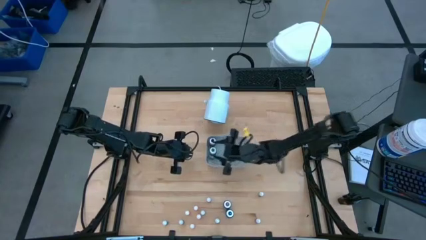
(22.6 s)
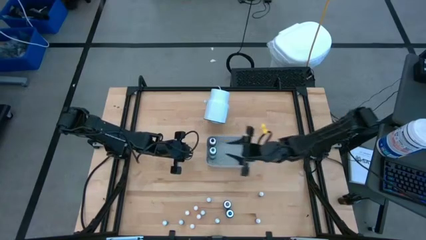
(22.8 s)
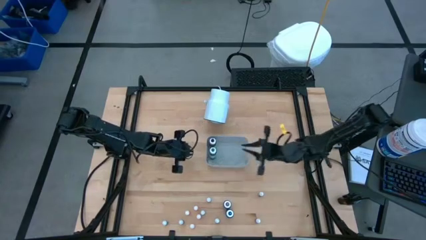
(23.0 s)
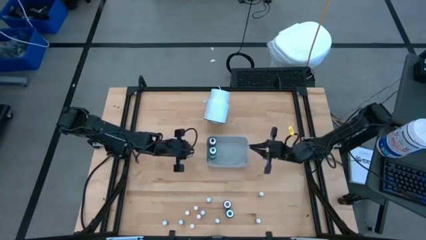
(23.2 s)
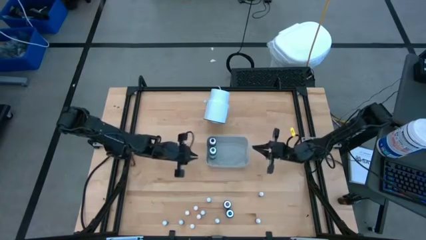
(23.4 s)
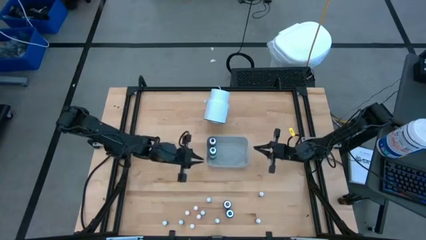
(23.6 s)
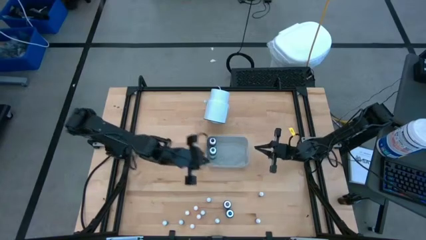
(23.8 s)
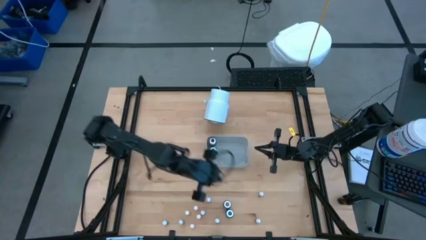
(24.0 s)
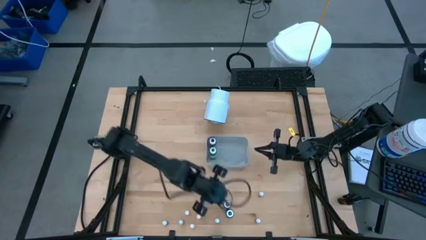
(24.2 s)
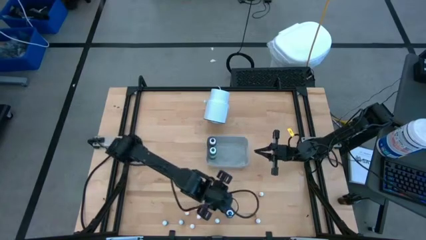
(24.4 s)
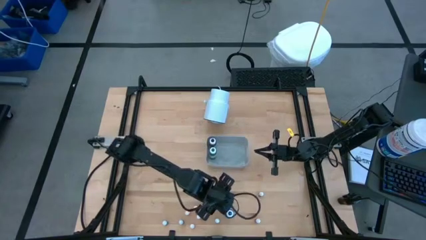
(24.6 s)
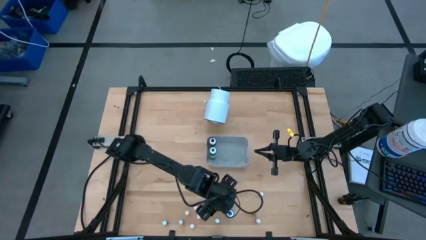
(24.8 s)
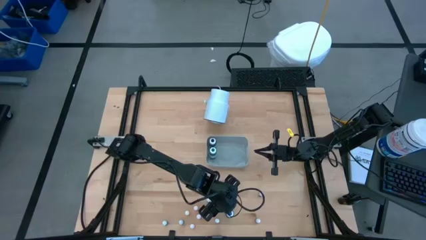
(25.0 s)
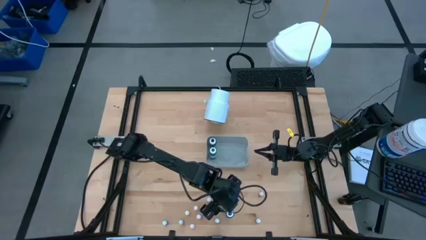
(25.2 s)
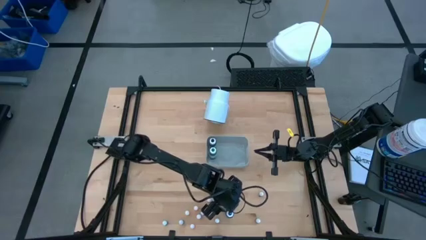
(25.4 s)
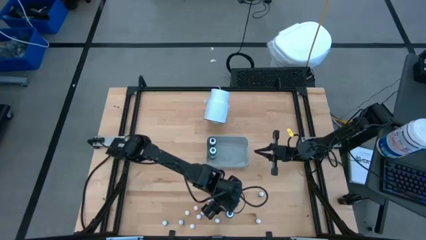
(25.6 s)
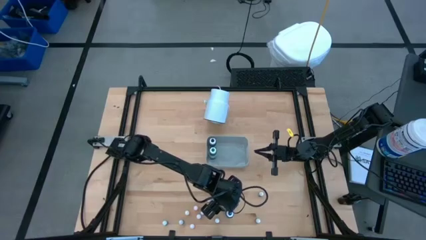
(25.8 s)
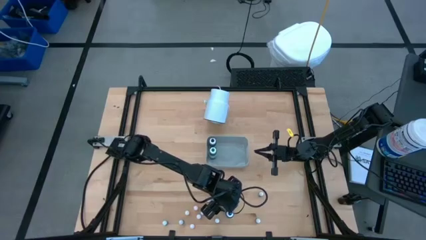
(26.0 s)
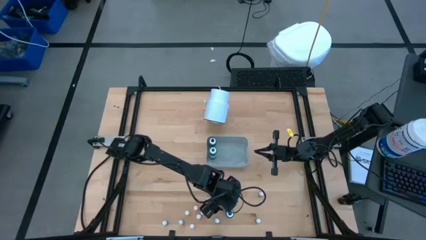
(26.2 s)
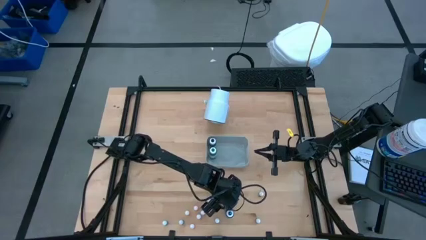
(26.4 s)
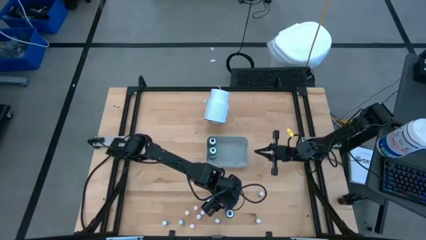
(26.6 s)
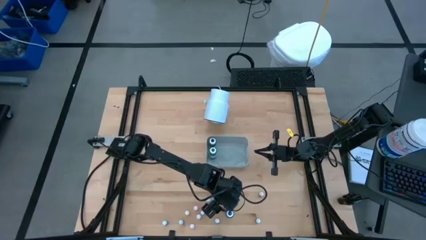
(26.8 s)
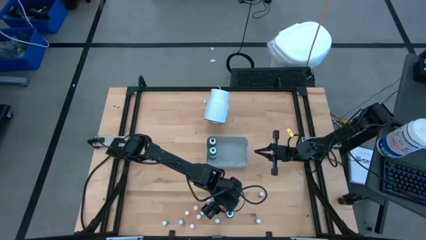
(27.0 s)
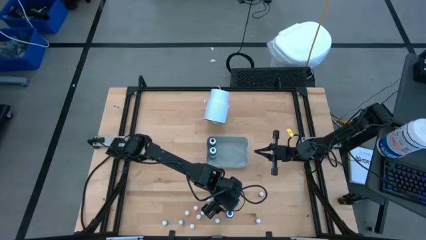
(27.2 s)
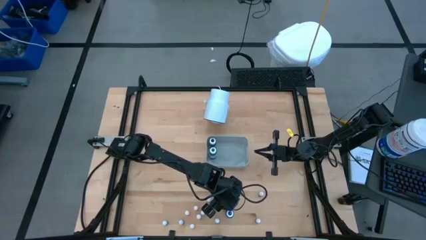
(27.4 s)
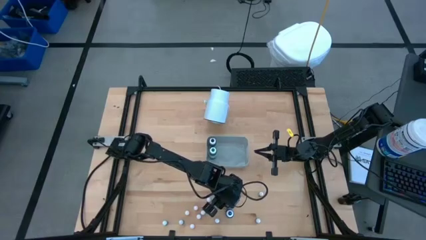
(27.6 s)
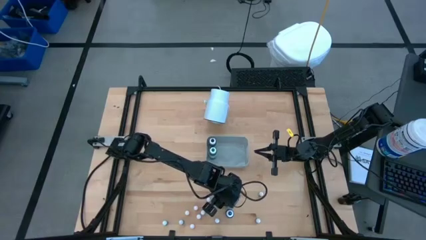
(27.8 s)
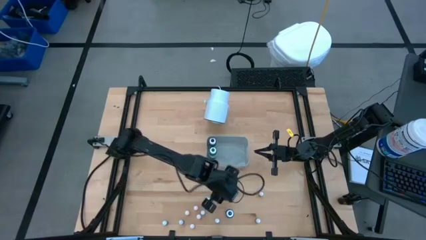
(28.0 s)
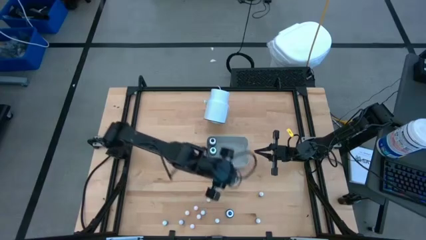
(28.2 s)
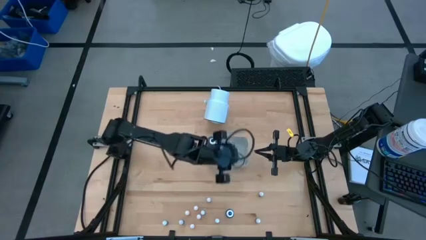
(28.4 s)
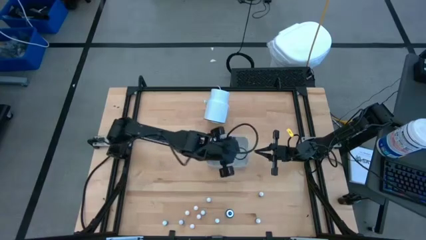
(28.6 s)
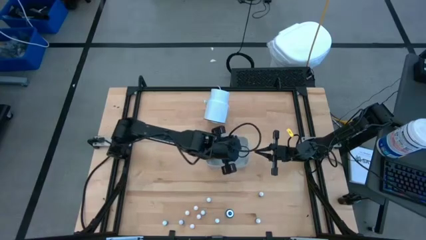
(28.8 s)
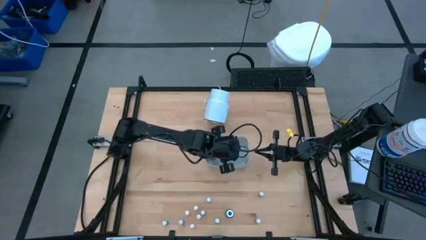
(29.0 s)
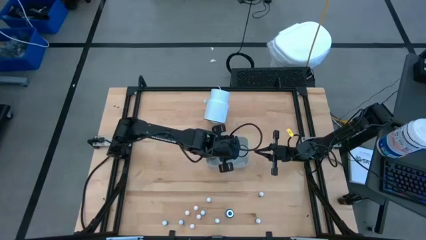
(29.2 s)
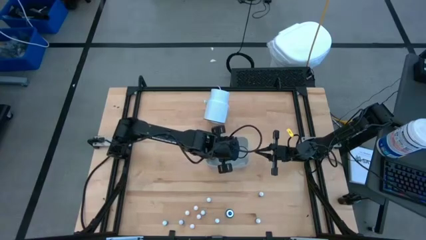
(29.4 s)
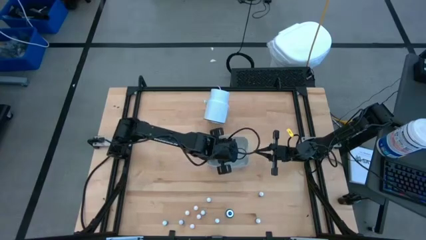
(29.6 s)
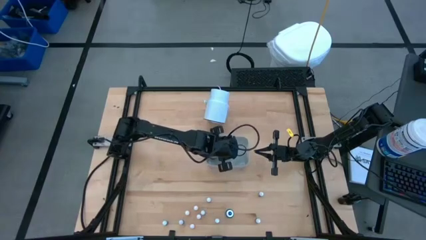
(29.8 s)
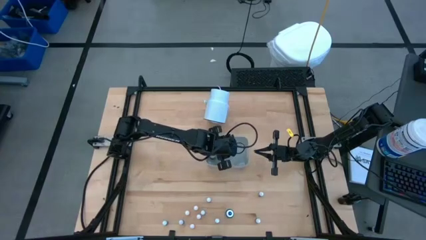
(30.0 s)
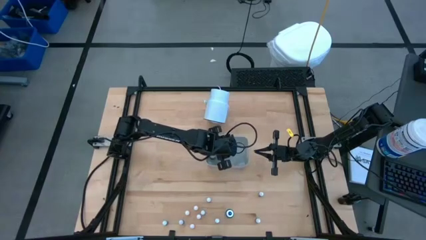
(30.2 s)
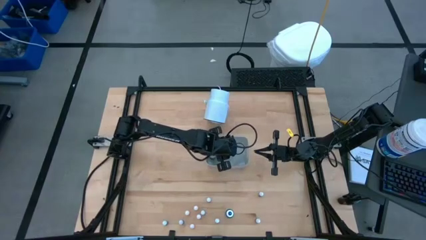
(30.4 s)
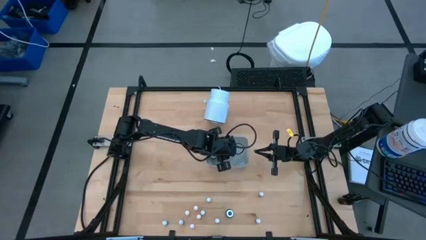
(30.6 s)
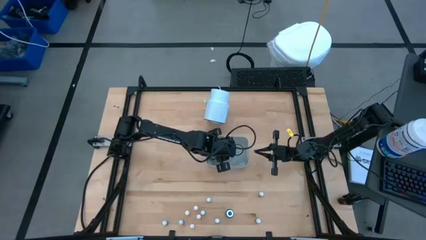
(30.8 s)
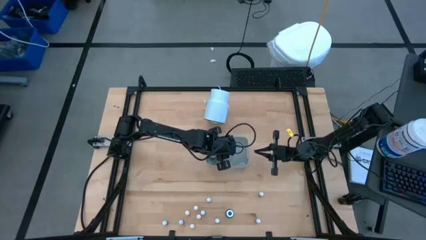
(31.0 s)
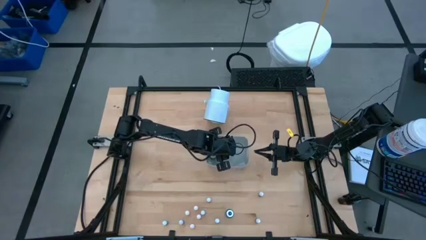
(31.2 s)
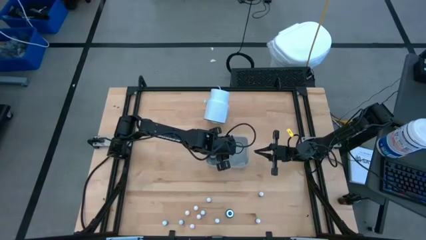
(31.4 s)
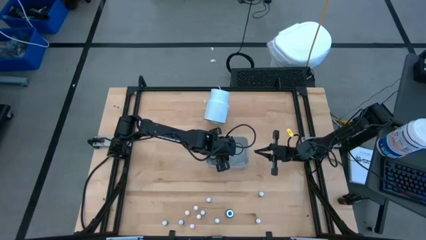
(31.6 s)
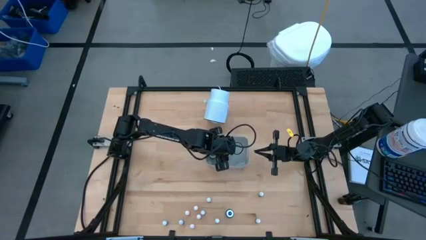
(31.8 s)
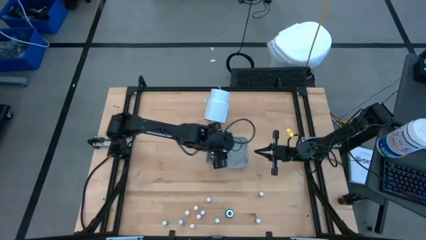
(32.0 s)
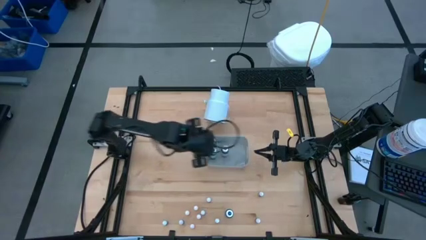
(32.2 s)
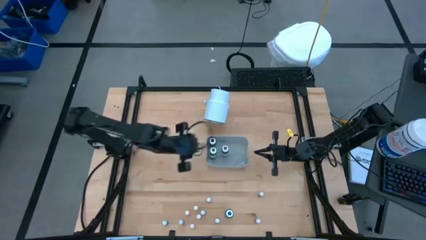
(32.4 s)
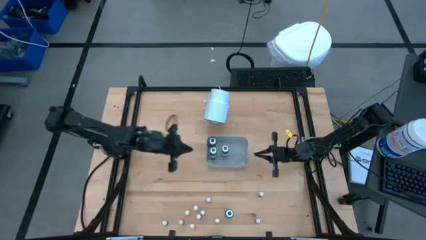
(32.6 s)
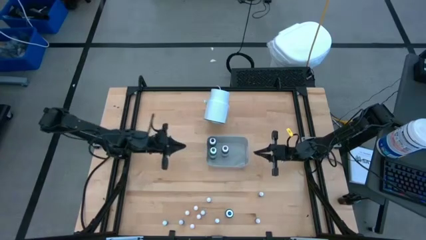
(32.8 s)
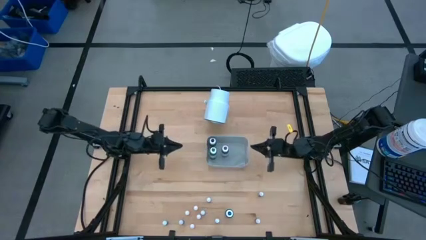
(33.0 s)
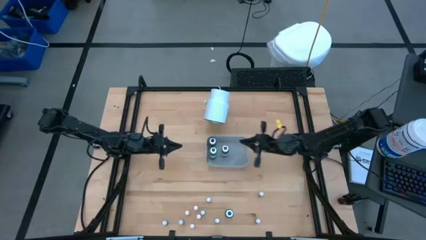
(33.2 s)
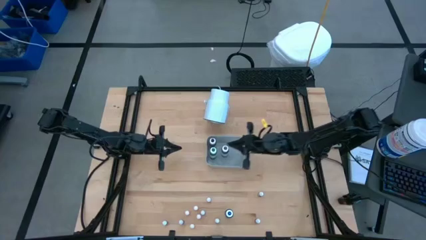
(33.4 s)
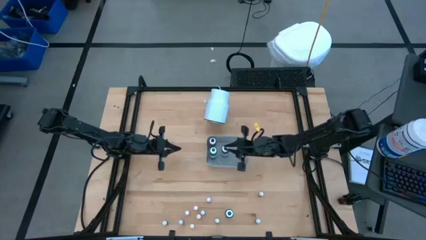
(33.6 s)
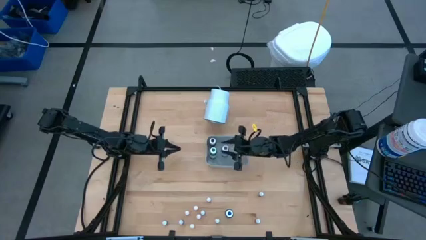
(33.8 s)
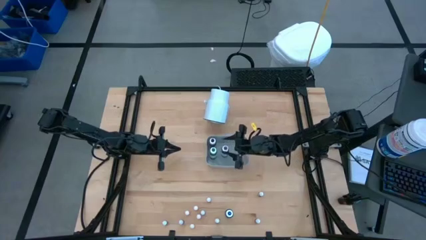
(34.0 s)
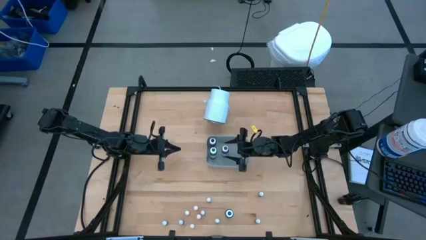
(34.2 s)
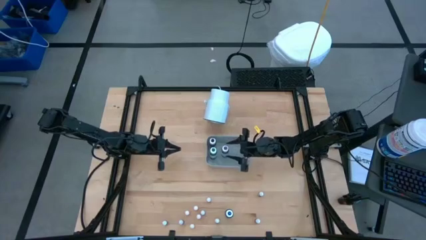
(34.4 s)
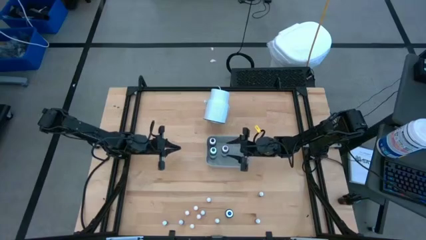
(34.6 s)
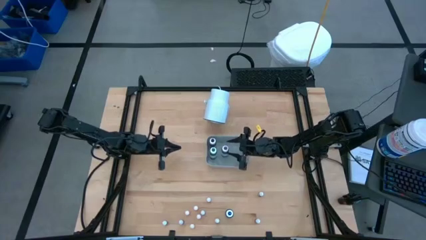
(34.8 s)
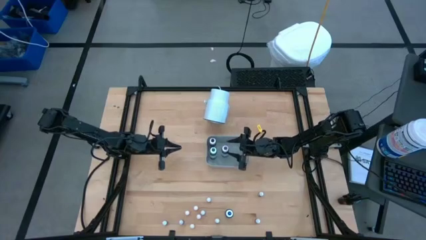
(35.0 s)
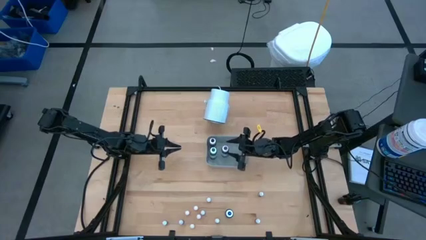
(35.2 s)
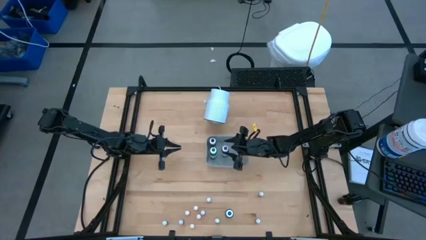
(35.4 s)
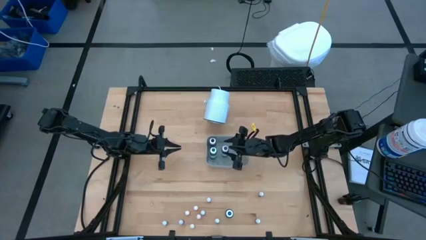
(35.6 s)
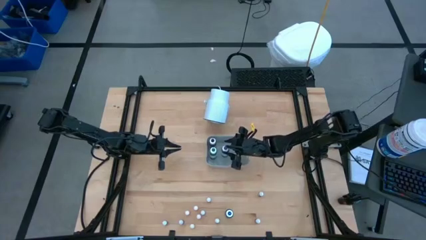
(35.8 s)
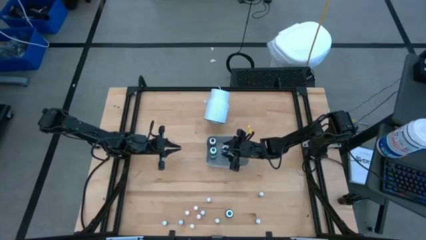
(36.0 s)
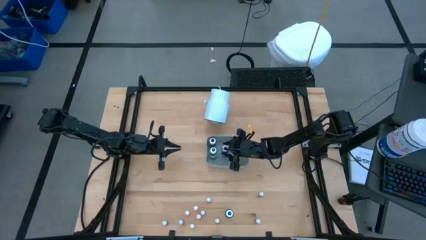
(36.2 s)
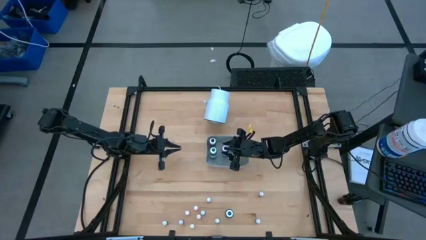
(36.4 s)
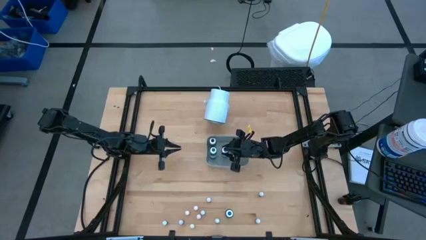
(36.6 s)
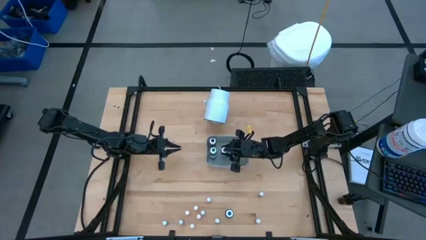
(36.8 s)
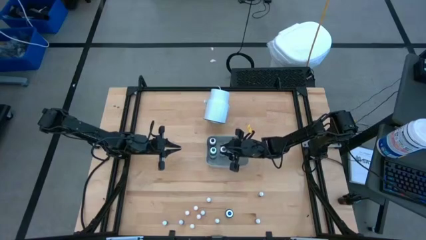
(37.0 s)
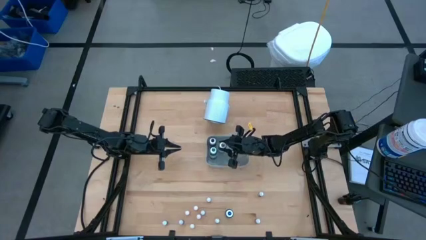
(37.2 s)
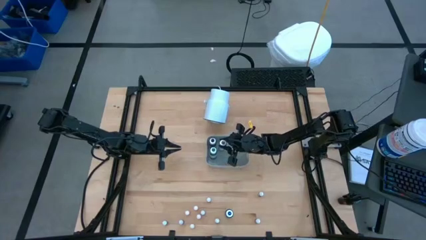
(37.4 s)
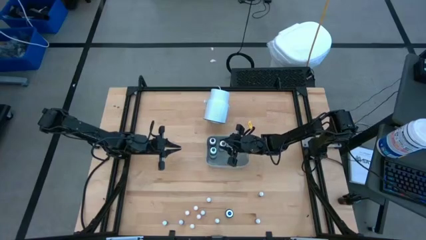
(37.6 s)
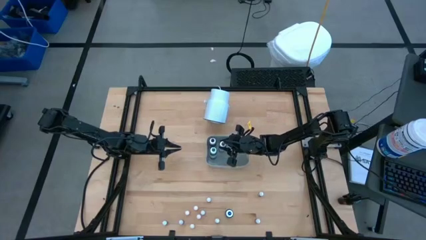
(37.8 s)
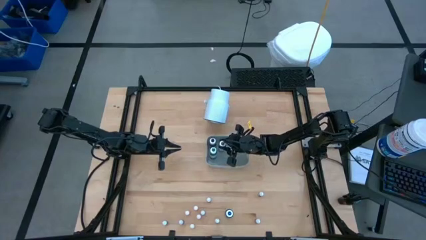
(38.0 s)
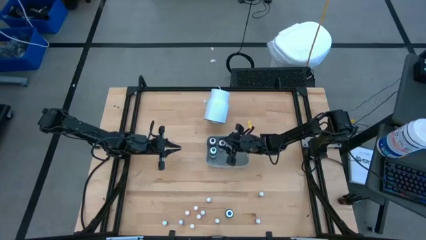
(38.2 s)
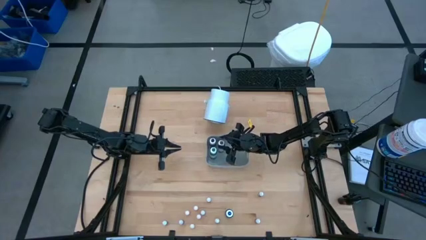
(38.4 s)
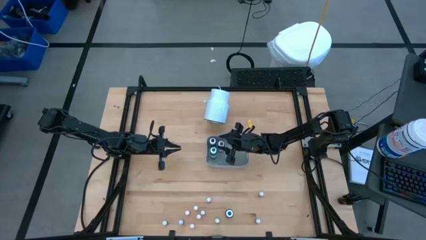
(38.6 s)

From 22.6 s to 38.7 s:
Task: Pick & Place food coloring
Put the large purple food coloring bottle into the gray bin
